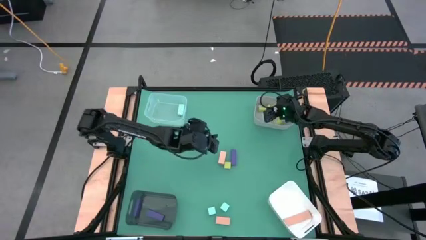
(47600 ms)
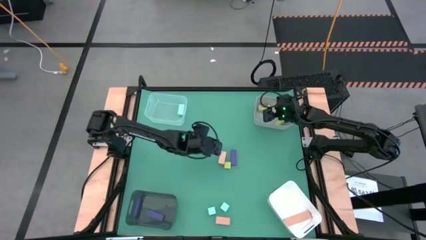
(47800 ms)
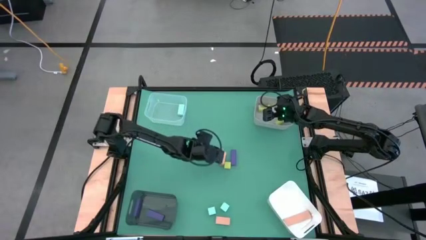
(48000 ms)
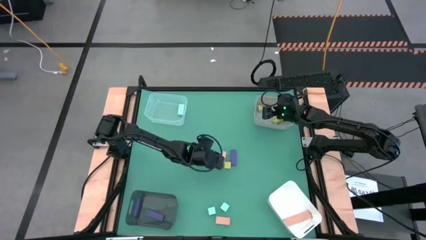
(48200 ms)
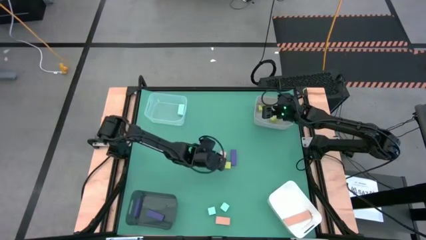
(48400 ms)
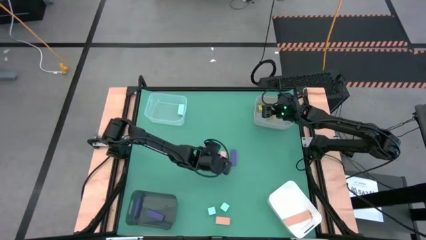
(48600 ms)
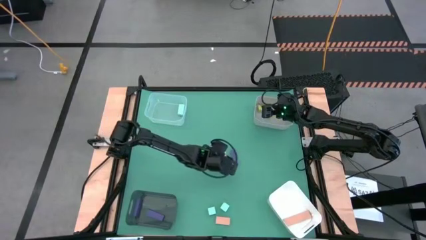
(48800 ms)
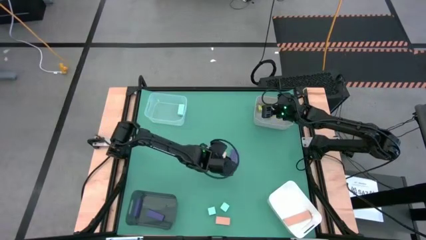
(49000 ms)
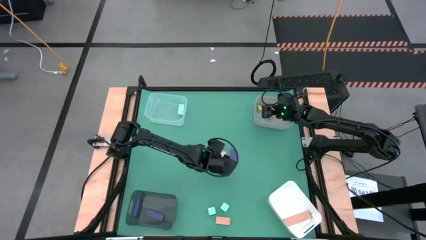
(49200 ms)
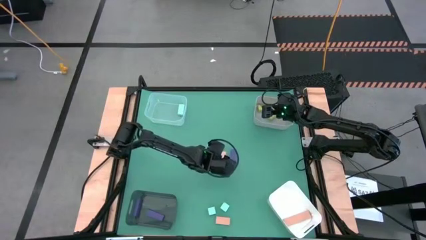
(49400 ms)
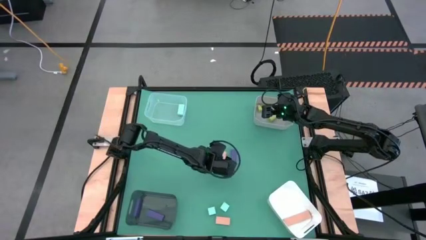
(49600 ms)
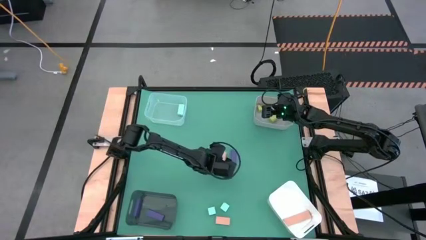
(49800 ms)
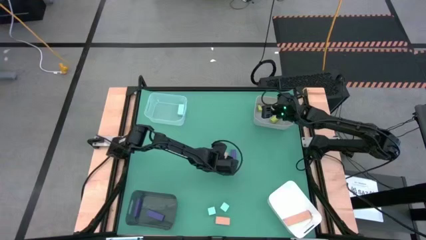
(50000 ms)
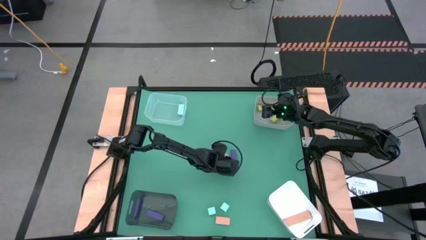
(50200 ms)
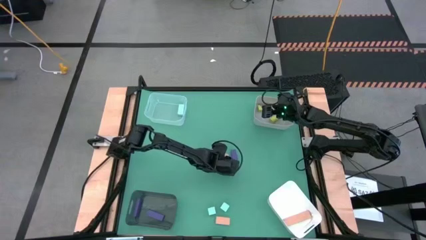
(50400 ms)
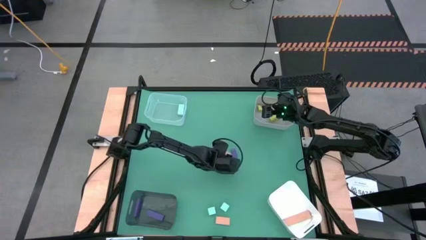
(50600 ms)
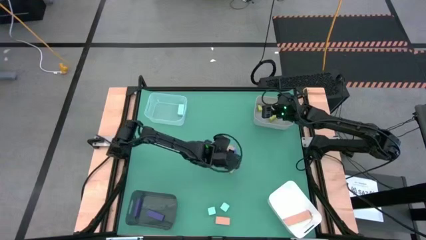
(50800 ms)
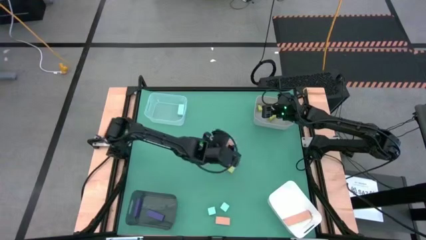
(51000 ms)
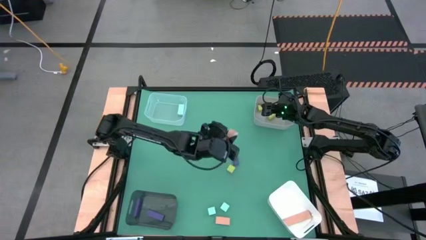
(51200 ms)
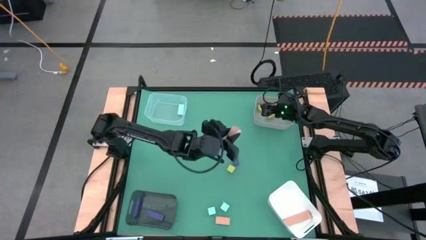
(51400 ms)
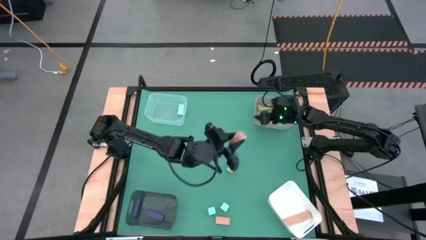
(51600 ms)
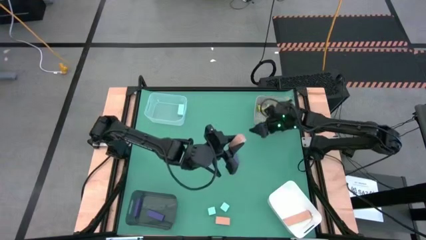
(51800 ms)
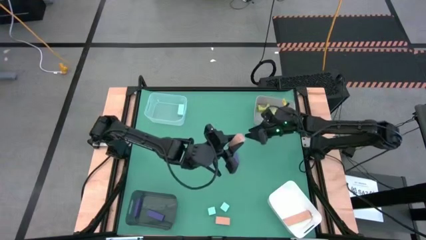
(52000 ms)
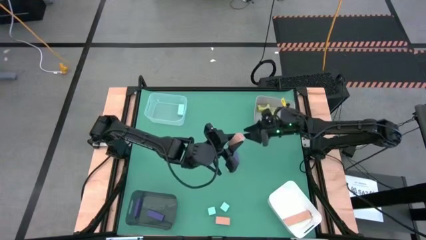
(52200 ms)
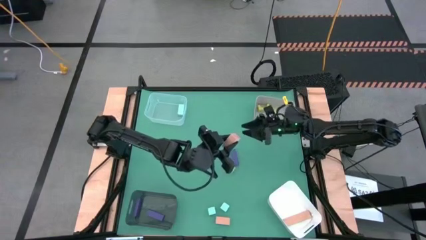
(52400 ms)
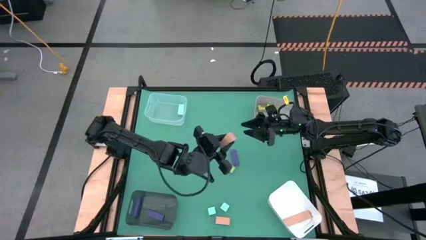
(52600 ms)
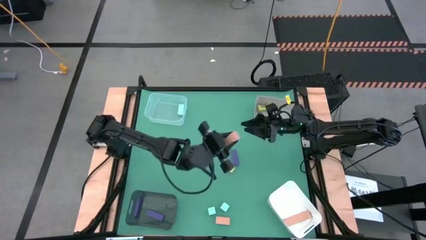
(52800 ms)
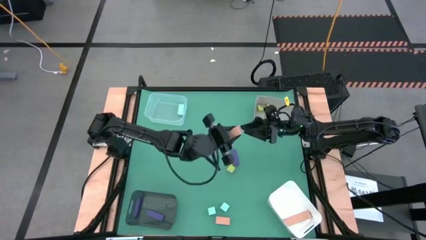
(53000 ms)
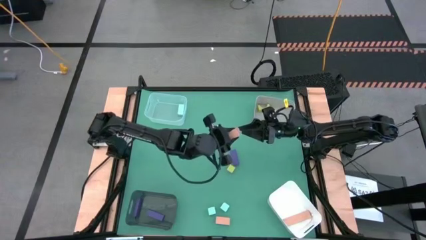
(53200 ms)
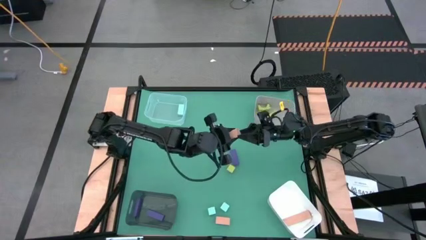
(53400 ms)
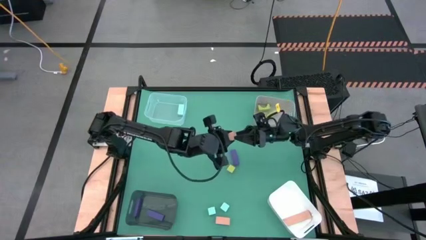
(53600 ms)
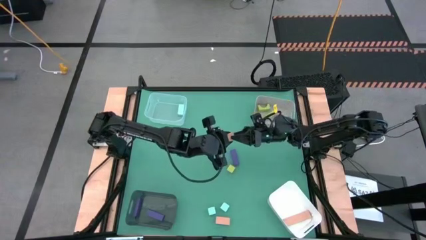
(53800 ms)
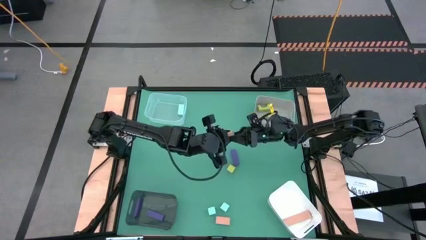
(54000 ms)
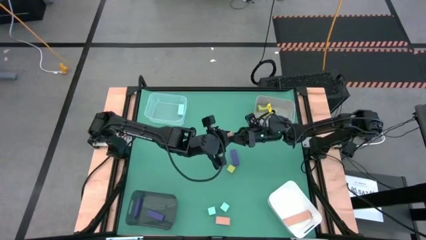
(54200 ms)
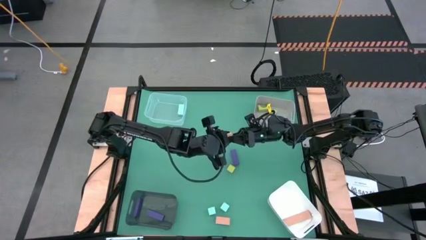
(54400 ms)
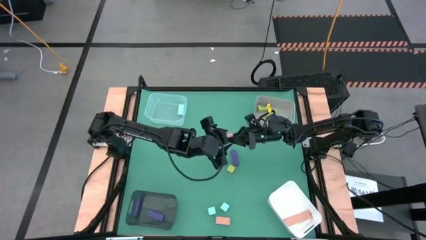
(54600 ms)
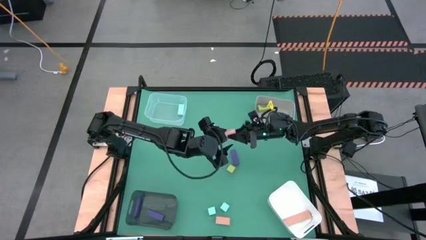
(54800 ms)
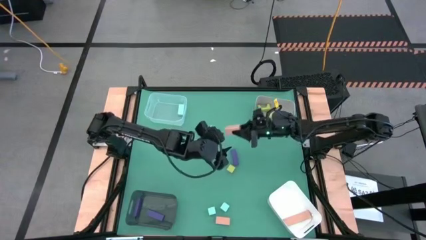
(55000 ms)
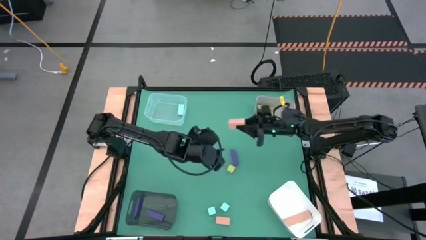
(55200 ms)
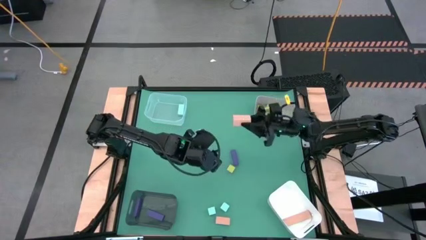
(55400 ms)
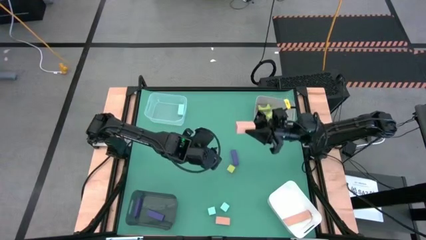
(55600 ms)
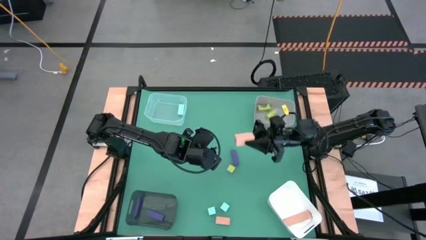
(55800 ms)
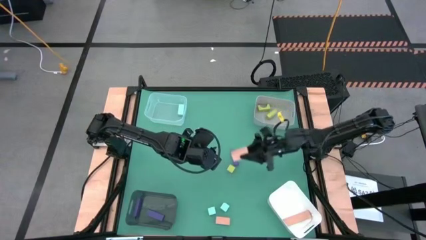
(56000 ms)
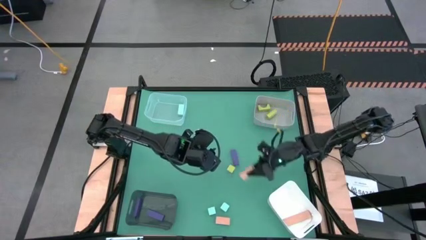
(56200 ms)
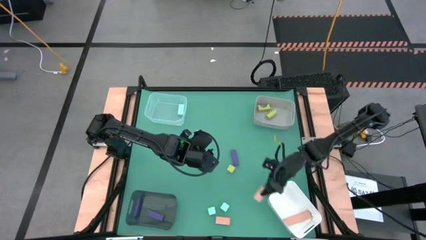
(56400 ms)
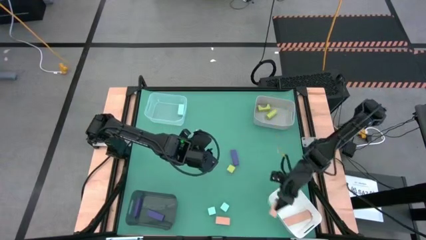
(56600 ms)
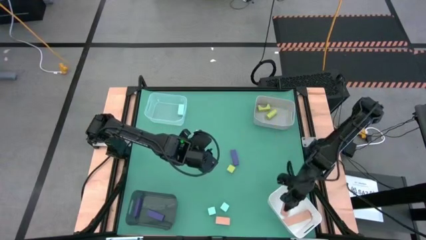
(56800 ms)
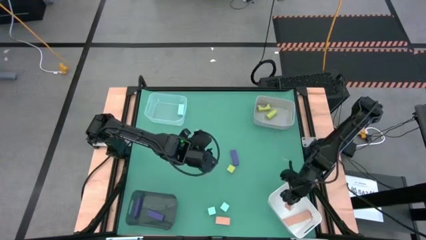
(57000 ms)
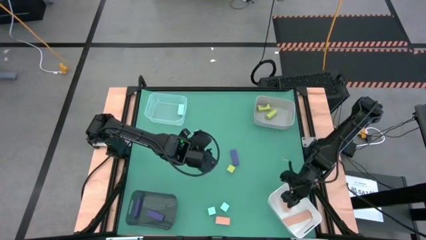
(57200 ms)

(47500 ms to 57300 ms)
Task: Sort & place blocks by color
Put the top brown block into the white bin

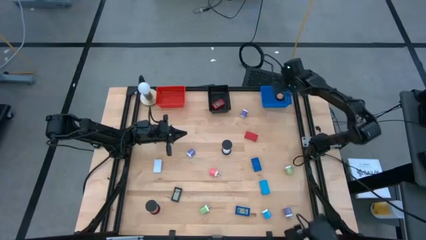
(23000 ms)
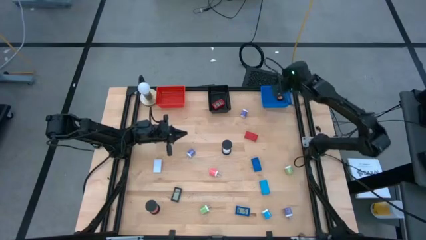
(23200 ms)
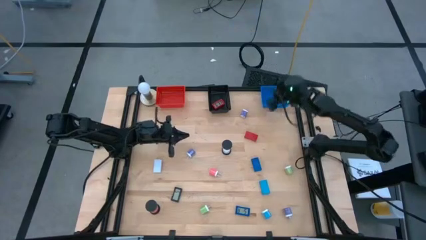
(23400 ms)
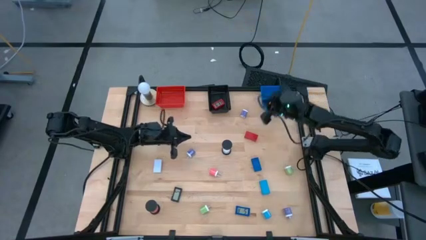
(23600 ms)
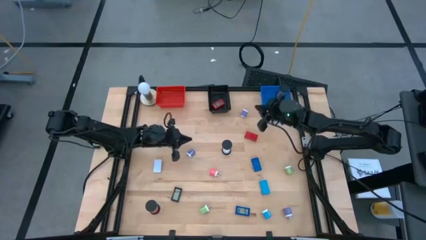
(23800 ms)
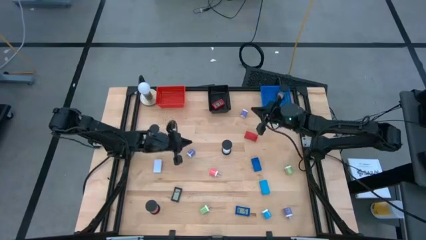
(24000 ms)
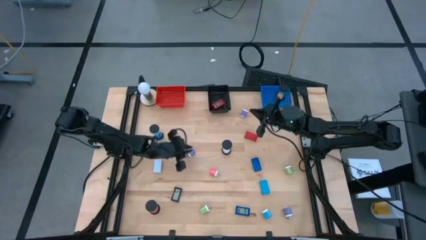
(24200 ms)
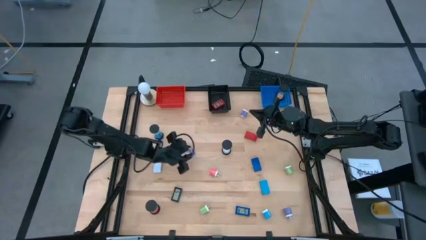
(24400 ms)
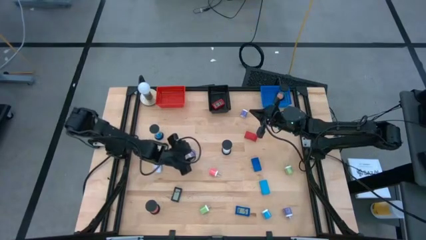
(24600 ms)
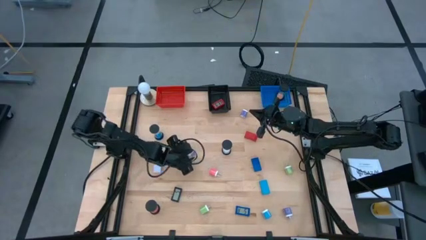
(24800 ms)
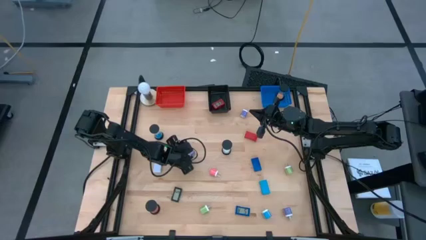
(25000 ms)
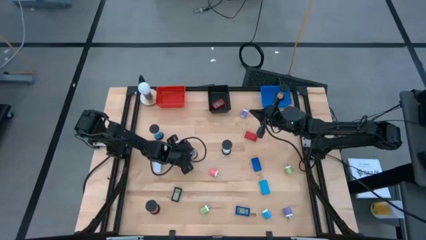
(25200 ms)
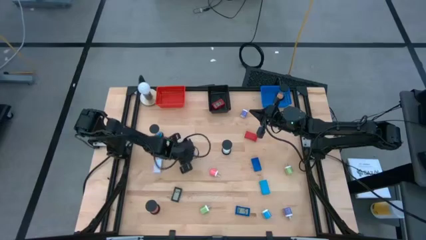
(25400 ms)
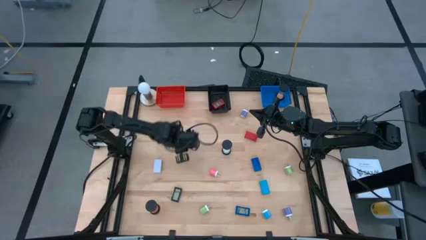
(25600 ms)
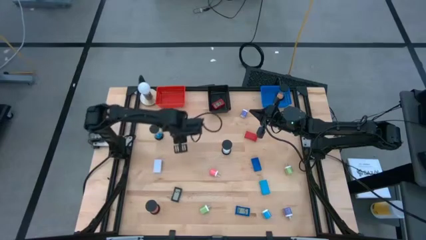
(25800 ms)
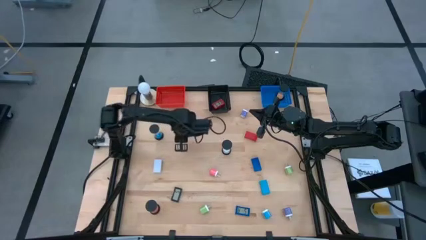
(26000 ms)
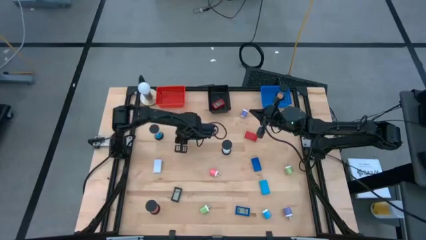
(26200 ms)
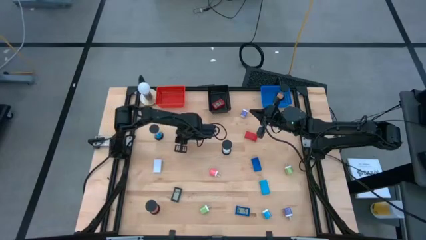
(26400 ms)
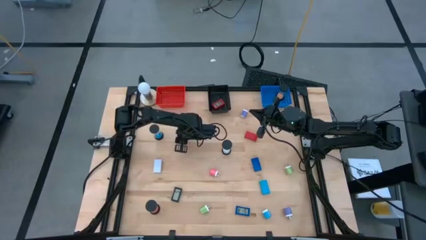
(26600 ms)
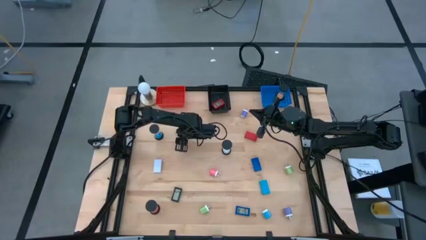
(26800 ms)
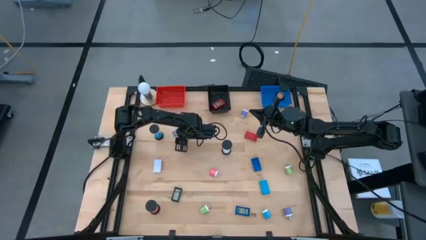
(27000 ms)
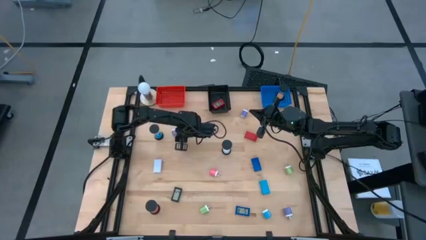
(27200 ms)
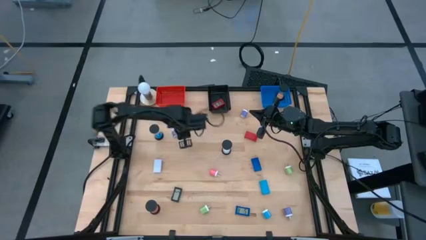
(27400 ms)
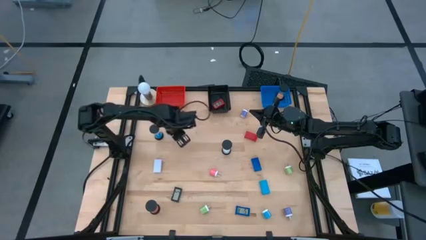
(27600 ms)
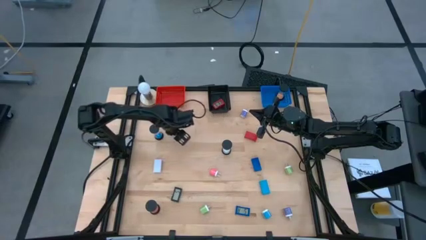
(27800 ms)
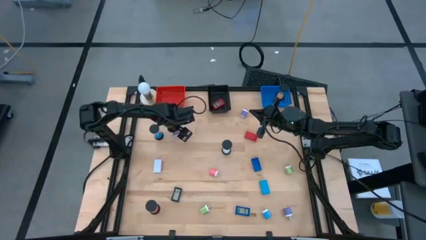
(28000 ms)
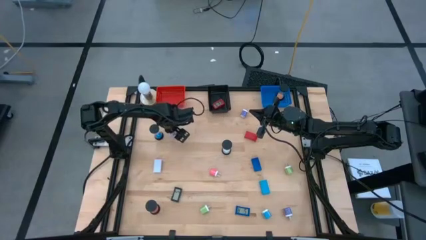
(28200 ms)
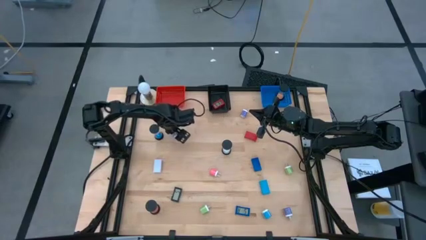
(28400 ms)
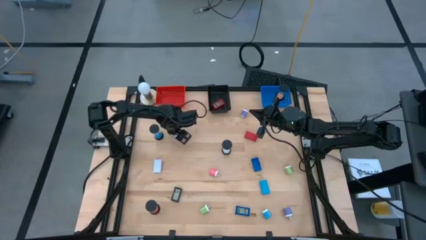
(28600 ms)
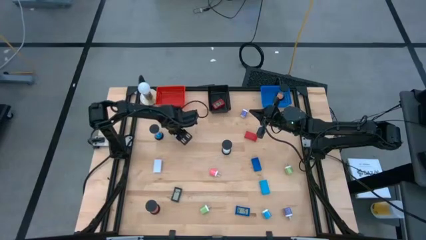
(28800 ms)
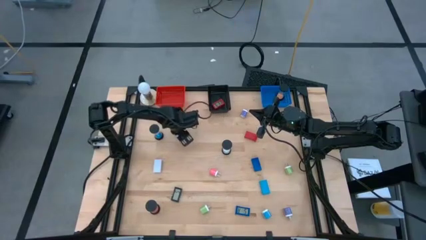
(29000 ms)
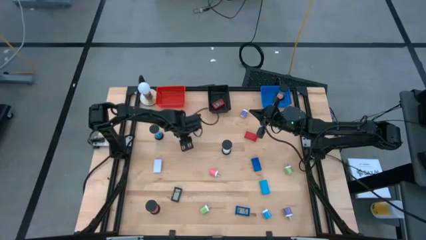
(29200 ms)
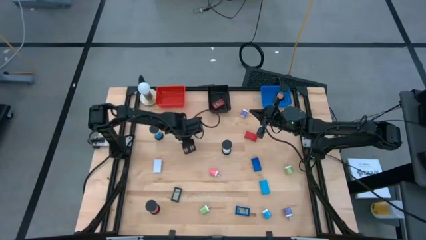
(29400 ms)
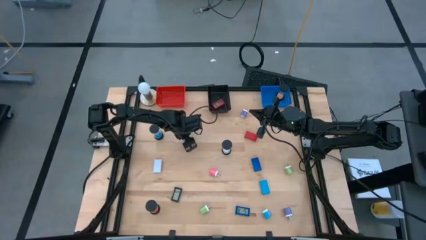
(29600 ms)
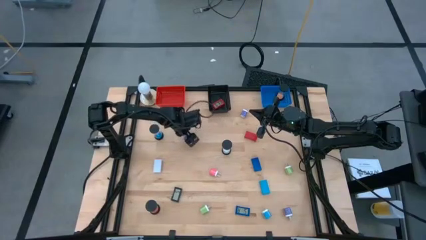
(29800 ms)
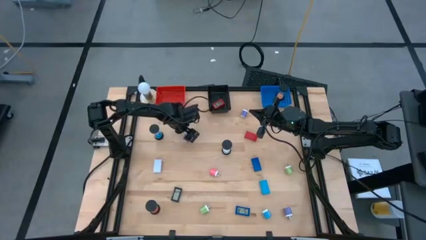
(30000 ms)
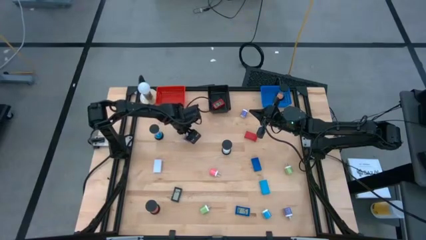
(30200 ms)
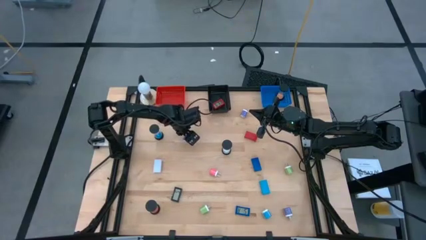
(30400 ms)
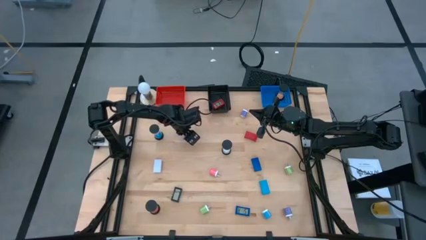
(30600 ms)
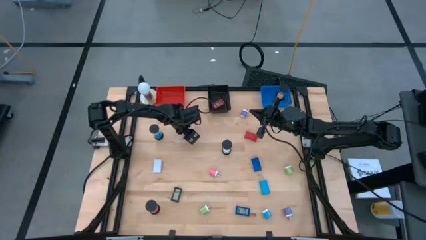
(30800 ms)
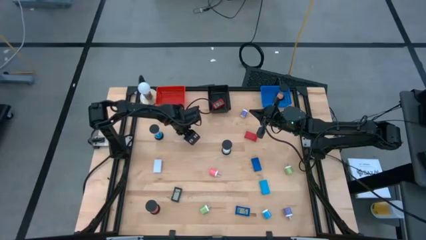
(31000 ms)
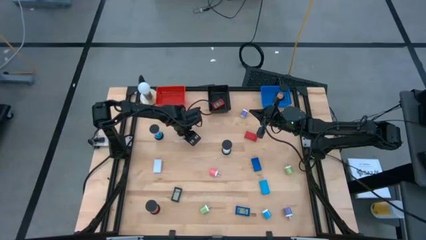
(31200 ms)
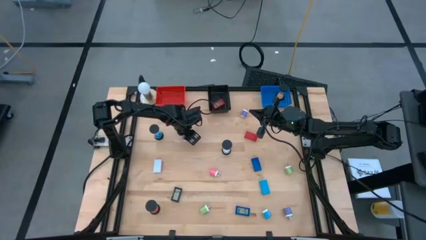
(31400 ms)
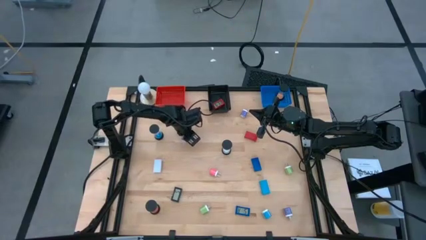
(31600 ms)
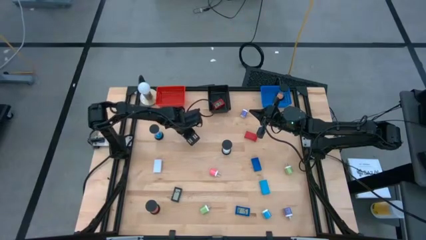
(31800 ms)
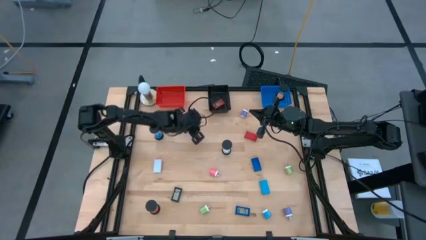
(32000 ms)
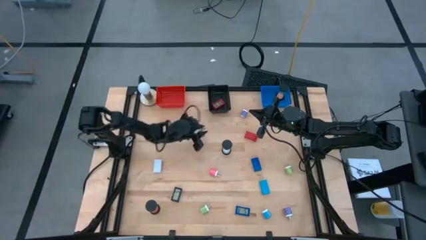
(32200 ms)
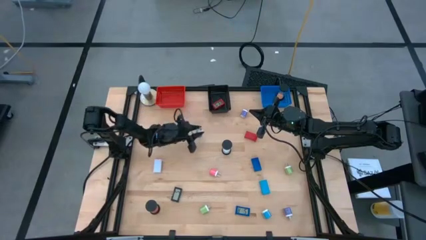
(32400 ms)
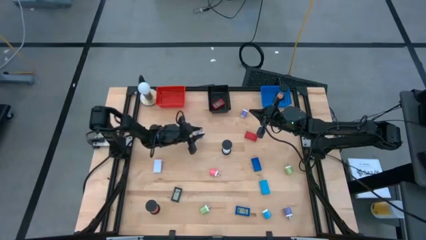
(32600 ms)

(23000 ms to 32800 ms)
Task: Pick & Place Office items
Put the middle left purple charger adapter into the red bin
